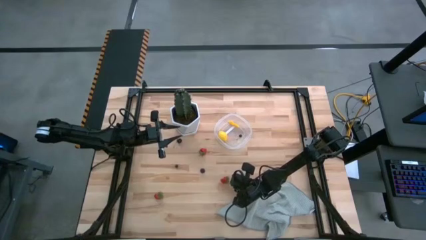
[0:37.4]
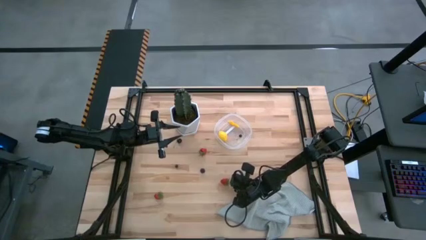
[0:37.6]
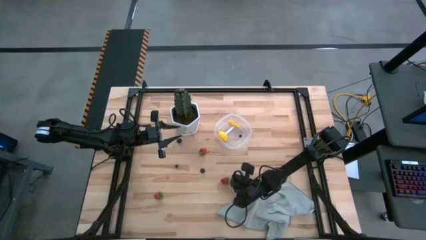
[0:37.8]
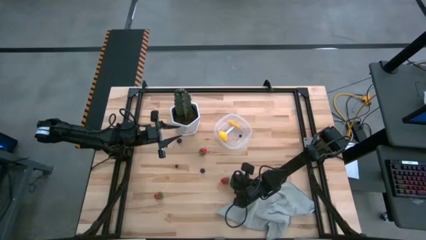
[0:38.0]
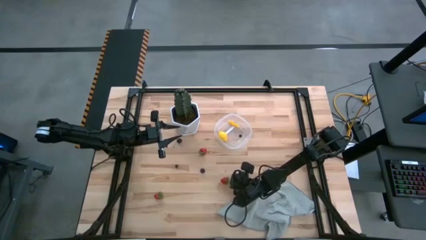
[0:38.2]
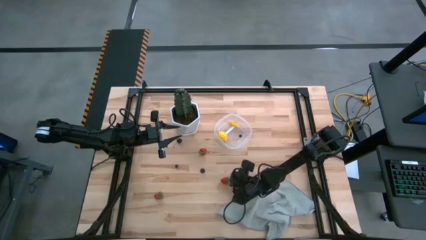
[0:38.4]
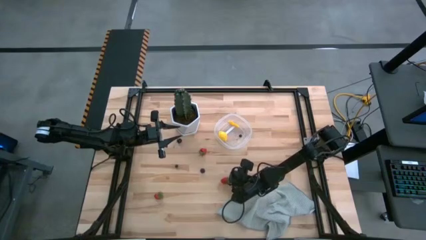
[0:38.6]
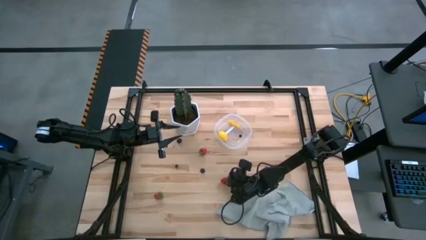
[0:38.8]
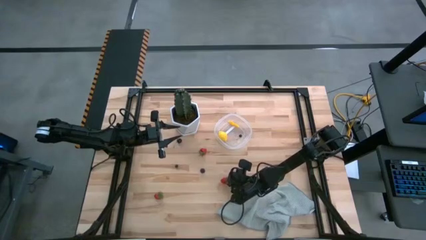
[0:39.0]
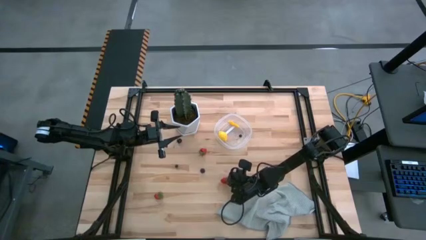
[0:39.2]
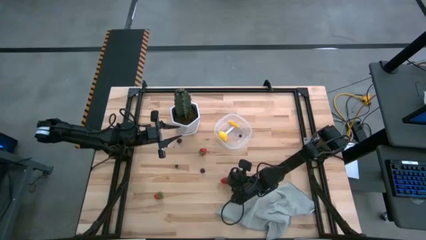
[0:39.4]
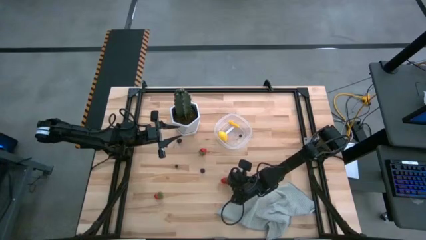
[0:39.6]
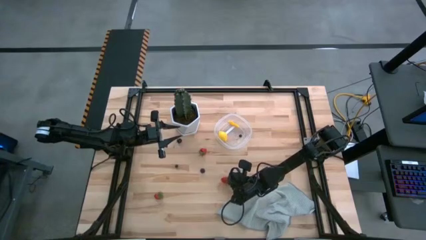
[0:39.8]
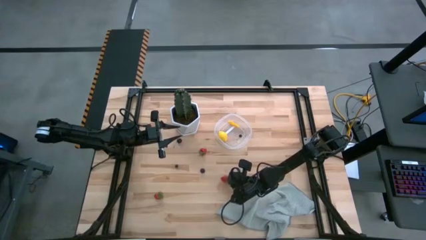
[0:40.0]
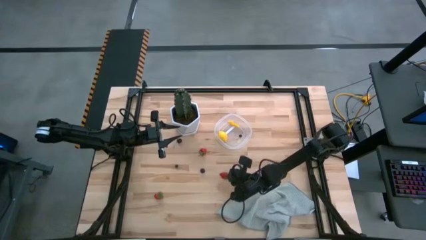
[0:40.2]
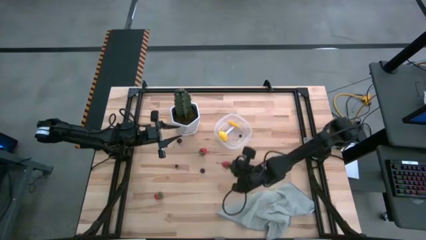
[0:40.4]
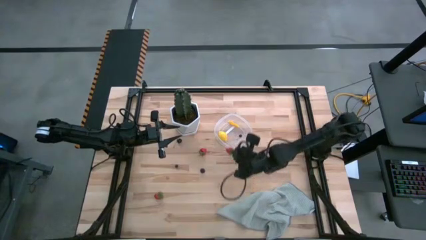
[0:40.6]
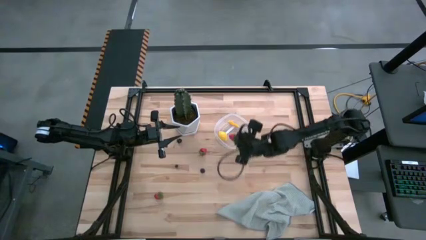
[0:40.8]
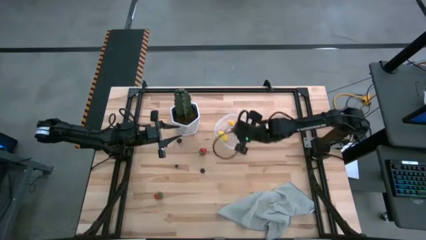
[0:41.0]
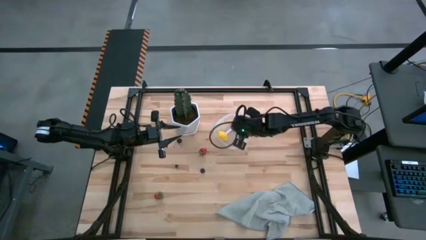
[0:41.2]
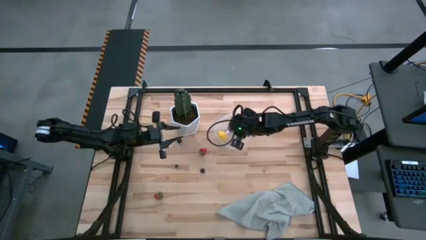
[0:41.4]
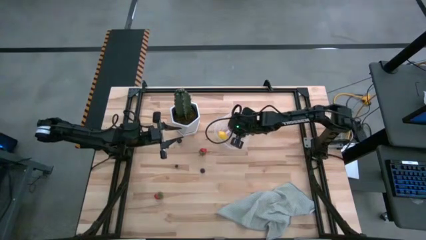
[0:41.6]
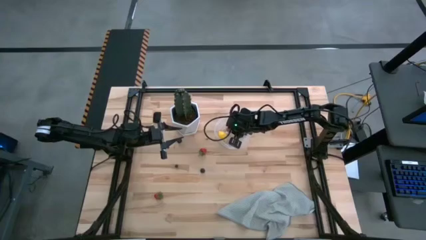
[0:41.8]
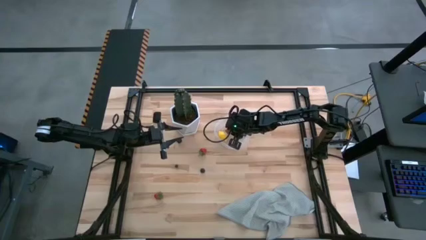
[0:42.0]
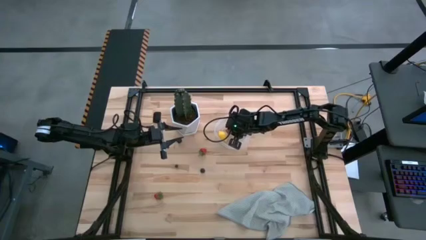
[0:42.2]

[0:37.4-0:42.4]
Task: Pick and placing Produce into tupperware
Put the middle right red strawberry into the transparent container

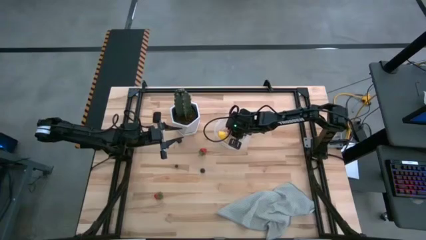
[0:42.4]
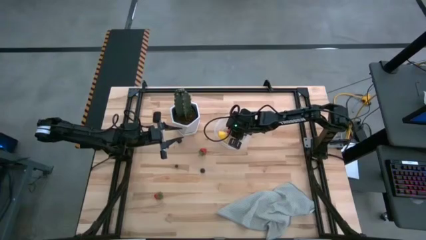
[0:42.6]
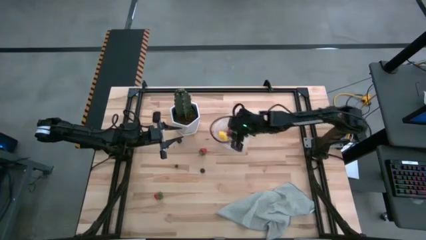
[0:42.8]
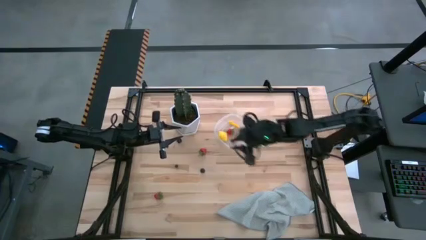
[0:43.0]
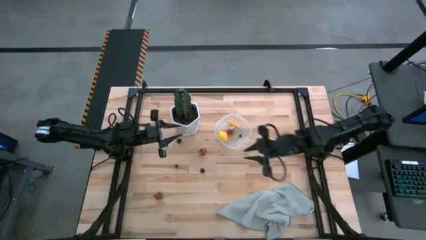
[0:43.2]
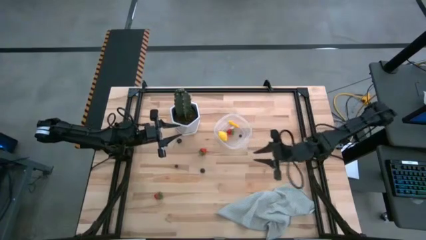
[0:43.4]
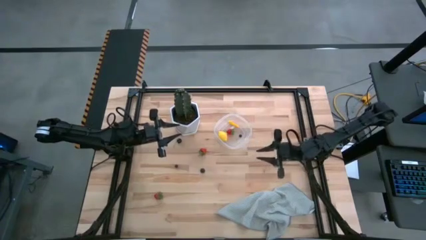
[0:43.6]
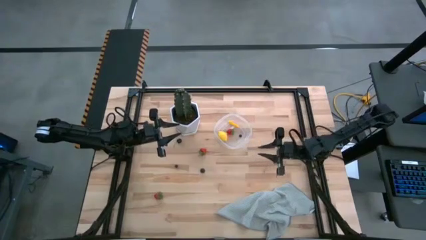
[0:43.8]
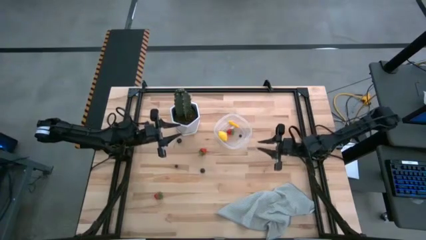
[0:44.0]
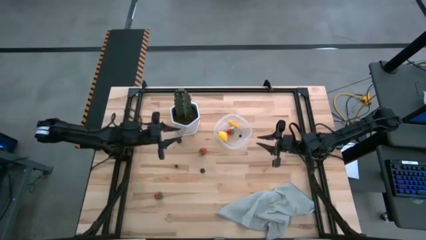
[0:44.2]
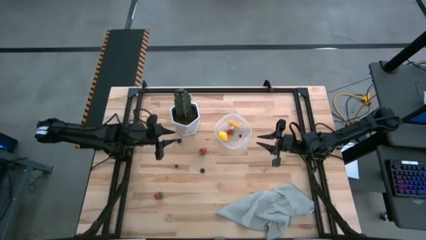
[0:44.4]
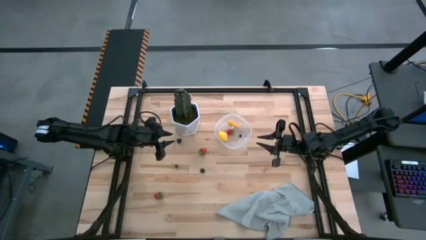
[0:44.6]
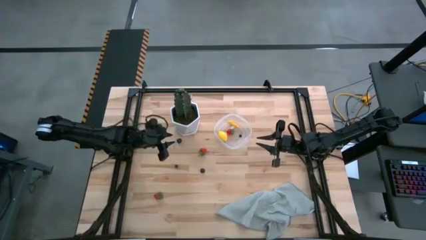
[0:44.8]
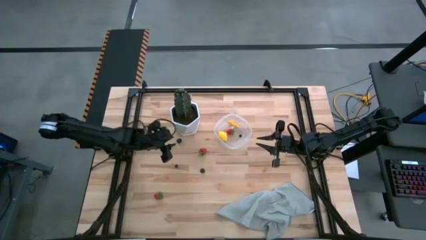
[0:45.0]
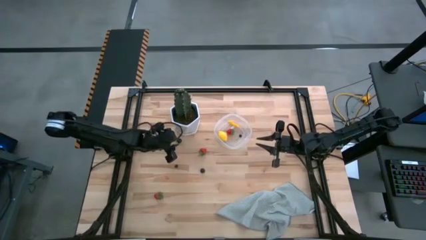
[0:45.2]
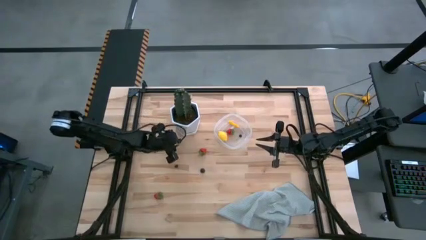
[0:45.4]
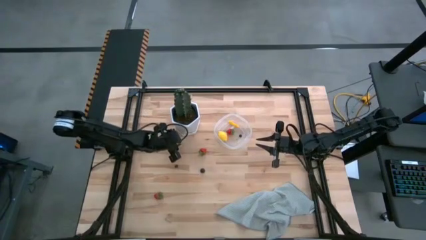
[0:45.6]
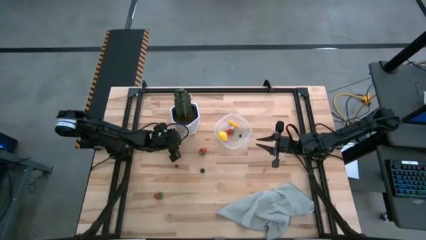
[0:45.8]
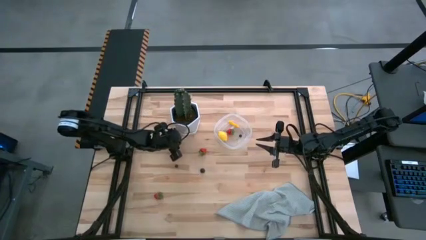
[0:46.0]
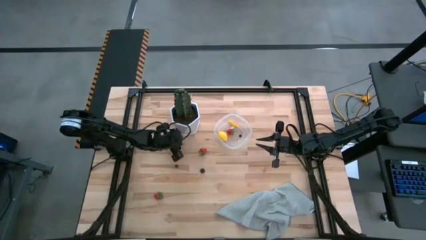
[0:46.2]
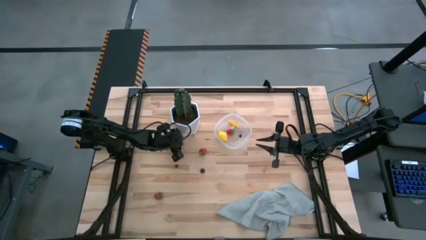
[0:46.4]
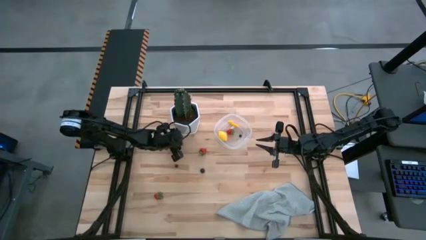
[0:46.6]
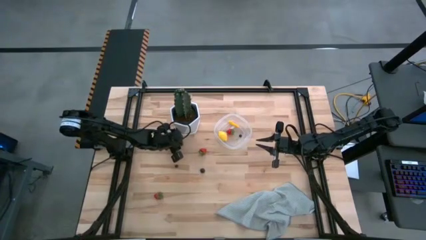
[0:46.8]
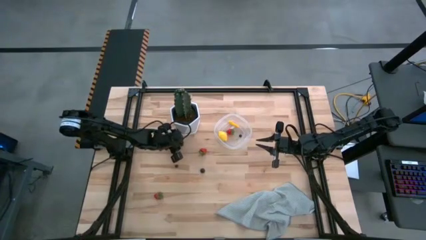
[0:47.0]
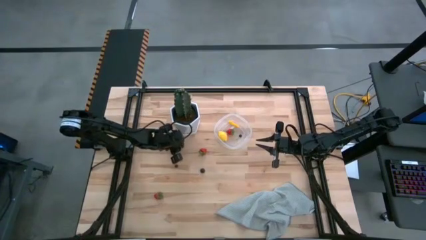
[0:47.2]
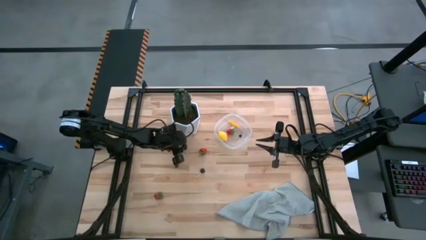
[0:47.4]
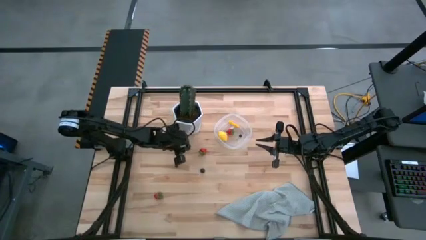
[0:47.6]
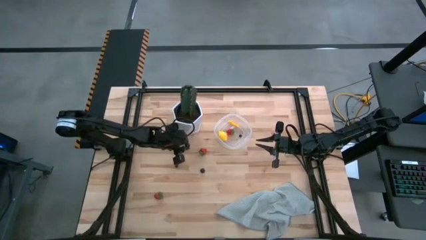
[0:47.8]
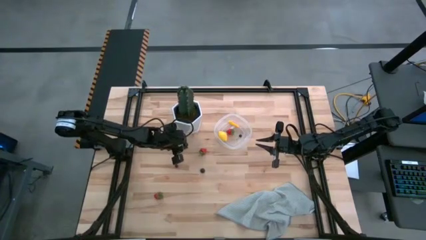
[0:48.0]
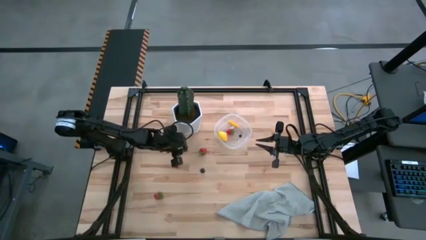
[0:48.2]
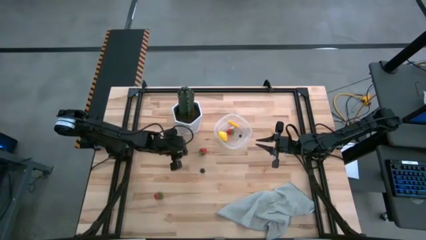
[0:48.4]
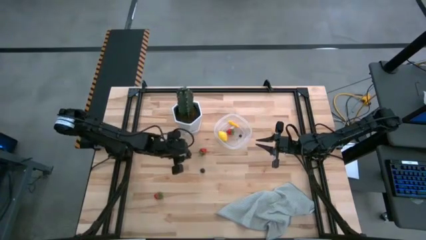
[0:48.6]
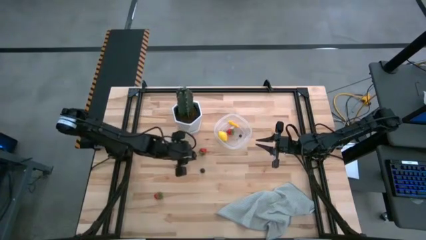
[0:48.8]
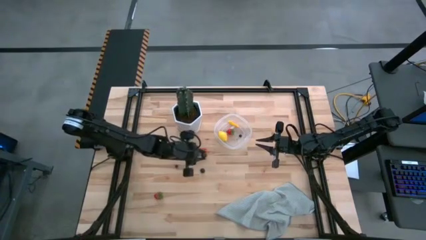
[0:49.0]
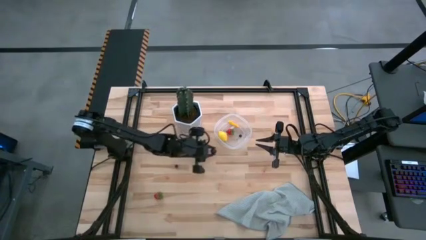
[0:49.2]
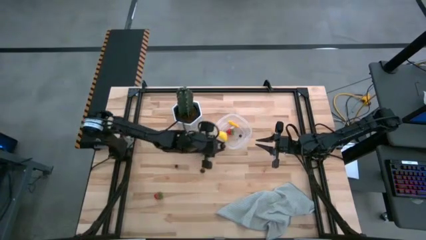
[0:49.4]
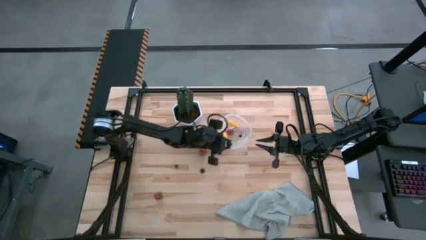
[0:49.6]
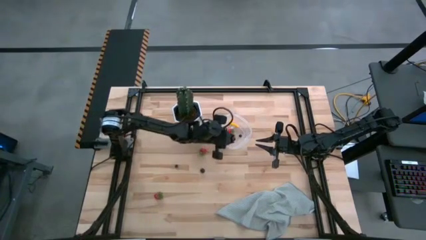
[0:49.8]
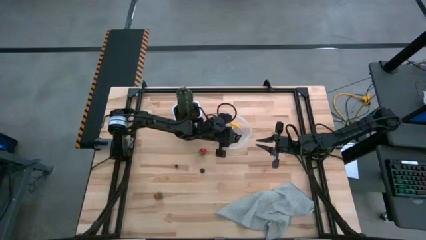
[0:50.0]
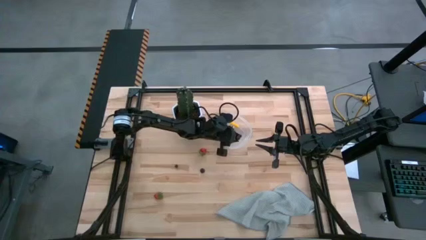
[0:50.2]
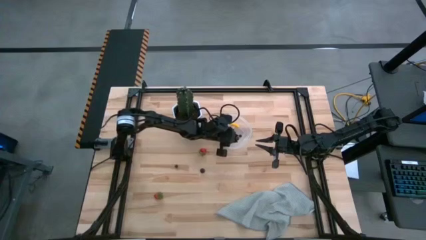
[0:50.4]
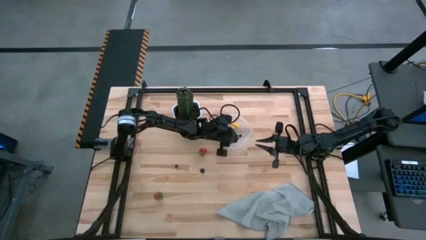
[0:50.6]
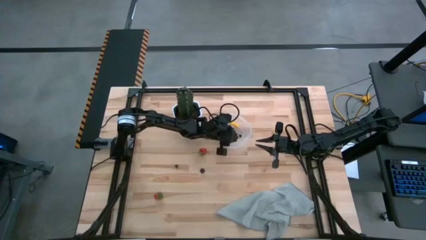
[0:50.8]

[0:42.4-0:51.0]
Put the black cherry into the transparent container

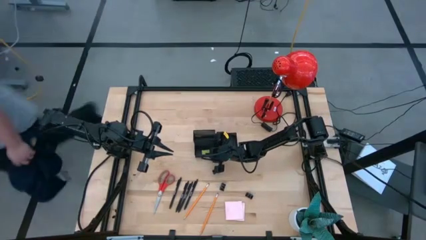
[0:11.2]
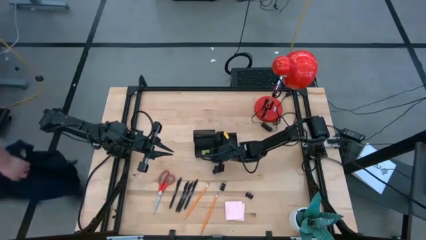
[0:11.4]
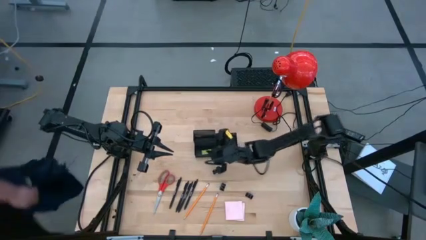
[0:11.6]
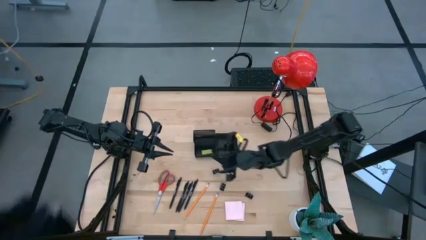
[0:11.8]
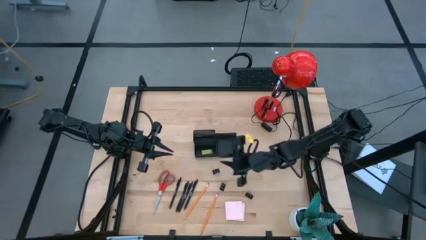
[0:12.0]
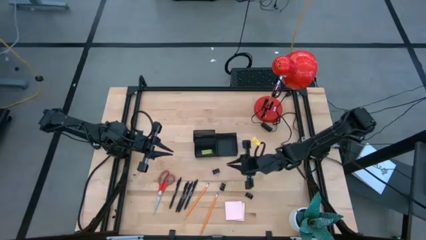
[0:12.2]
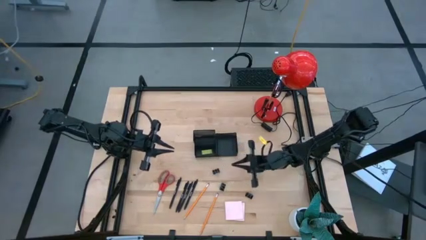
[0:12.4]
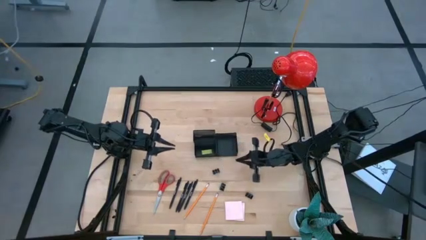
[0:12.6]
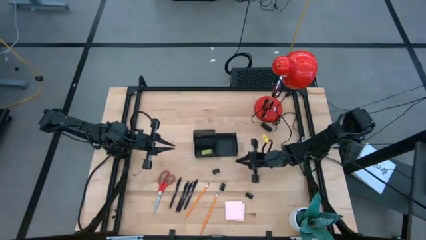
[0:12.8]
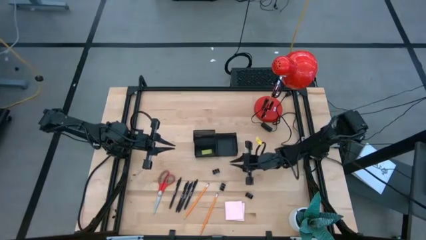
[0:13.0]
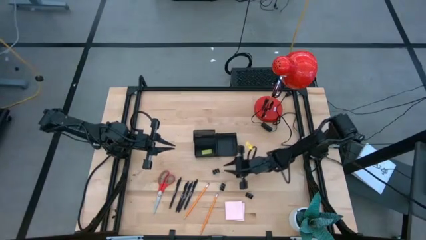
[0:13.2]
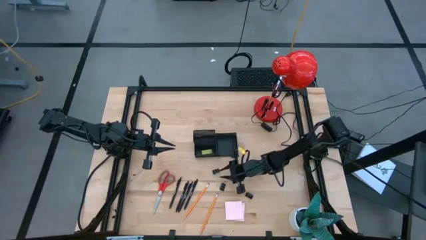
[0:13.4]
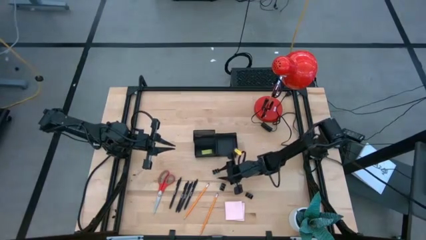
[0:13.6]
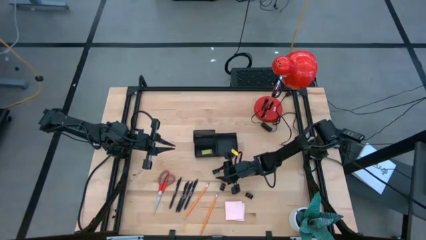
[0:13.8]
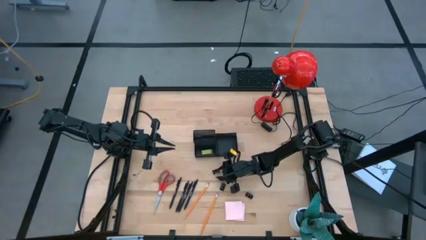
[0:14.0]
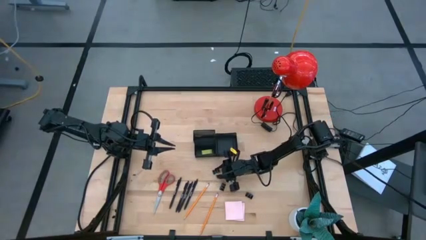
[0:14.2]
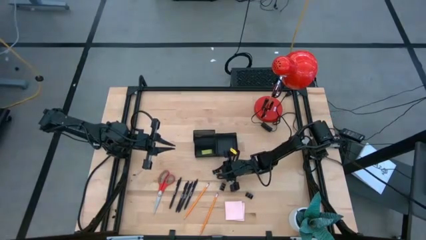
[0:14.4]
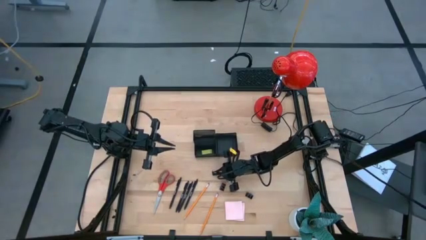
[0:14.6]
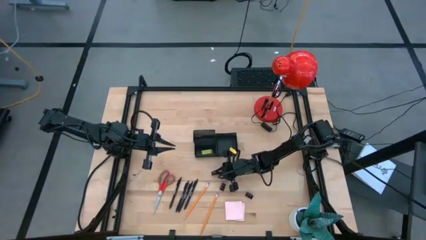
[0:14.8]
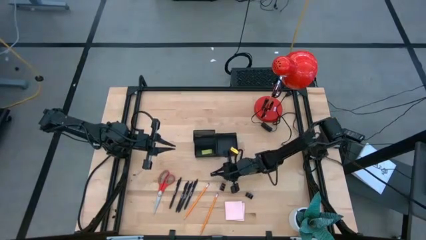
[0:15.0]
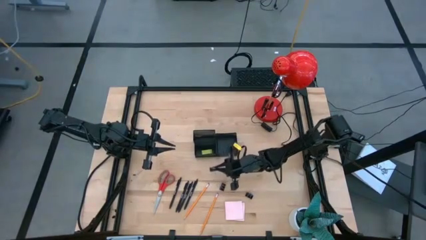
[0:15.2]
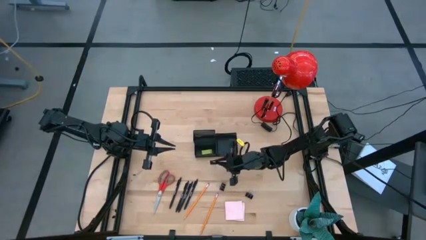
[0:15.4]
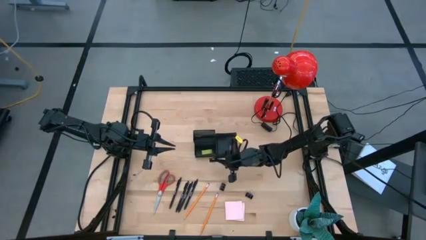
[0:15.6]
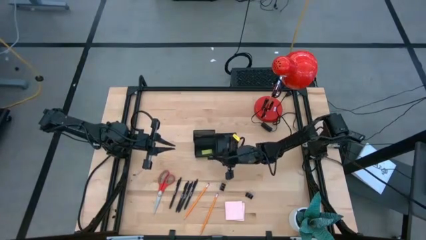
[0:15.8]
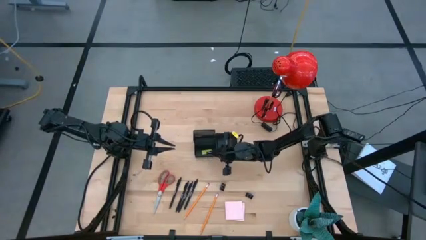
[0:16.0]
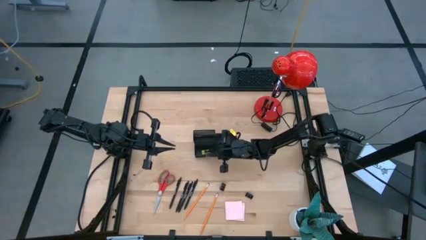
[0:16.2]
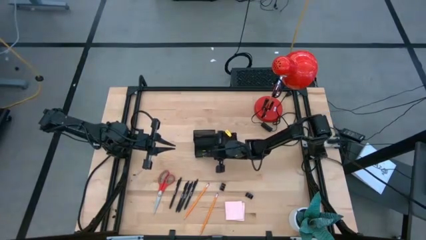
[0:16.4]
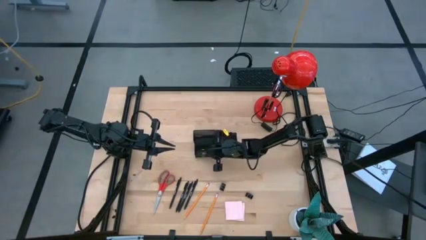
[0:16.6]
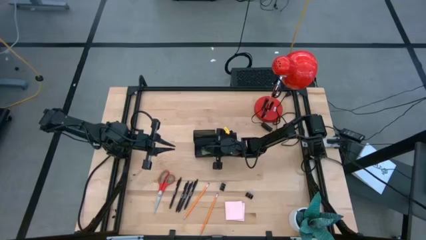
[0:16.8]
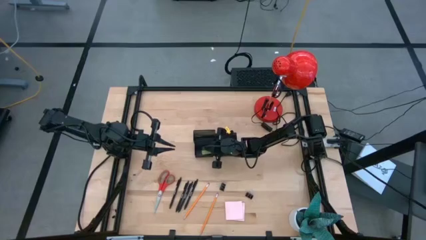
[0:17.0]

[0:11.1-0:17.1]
Task: Pick and place office supplies into organizer
Put the top left binder clip into the desk organizer
